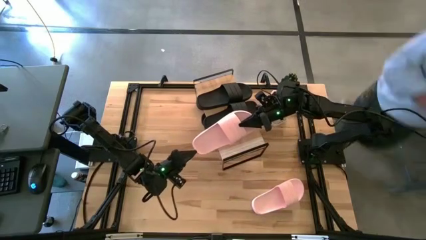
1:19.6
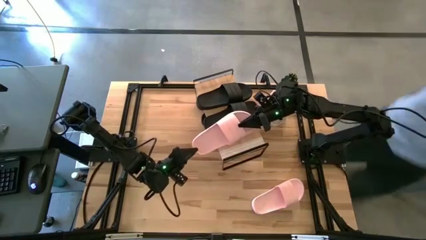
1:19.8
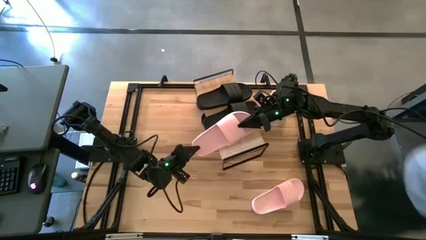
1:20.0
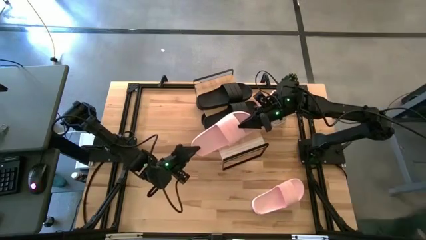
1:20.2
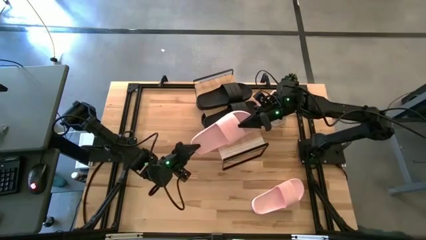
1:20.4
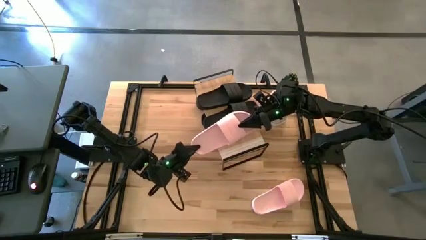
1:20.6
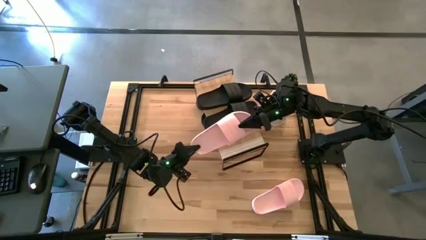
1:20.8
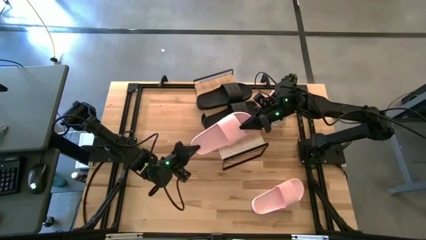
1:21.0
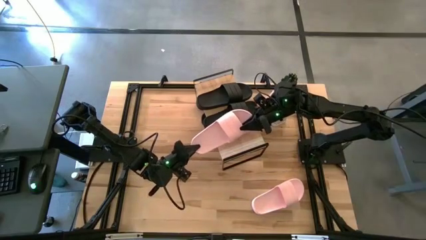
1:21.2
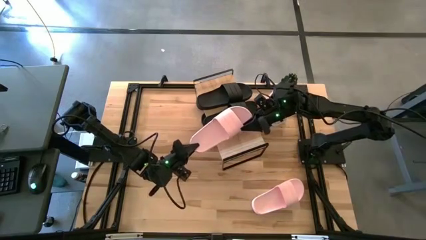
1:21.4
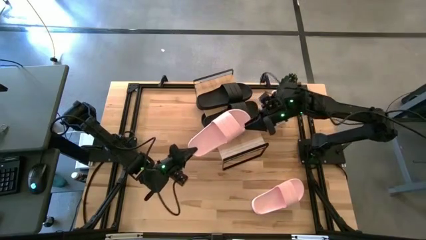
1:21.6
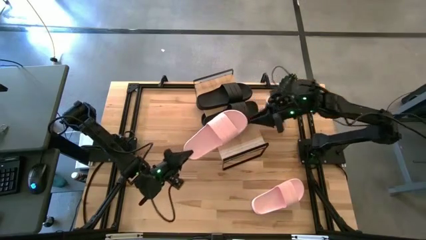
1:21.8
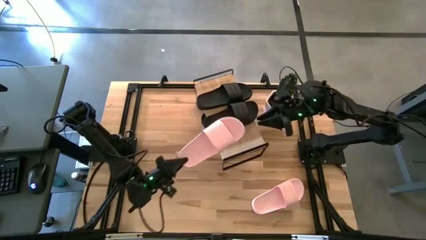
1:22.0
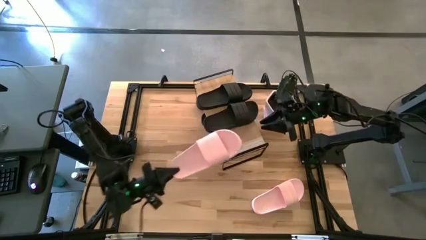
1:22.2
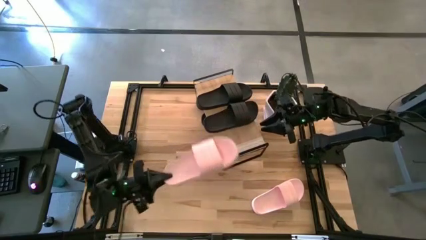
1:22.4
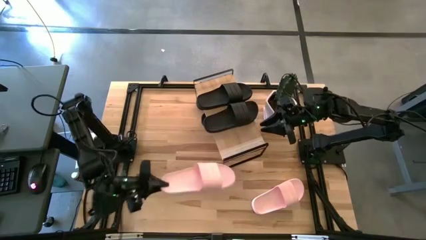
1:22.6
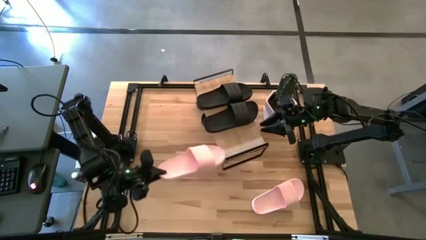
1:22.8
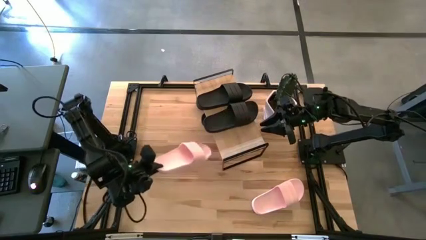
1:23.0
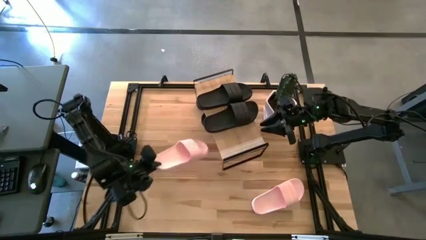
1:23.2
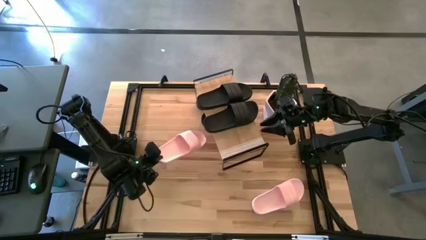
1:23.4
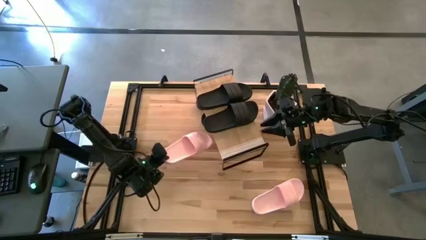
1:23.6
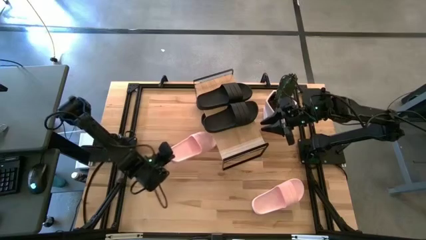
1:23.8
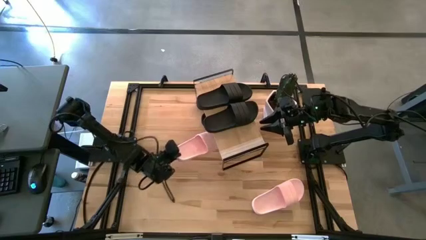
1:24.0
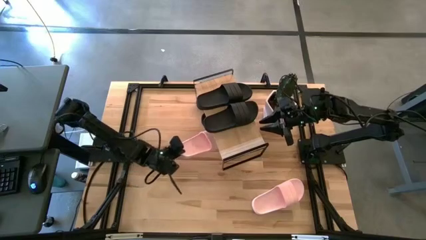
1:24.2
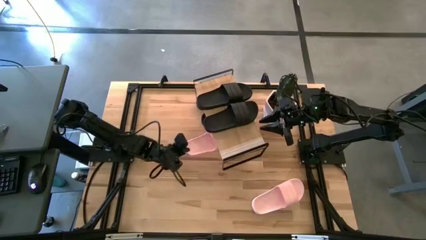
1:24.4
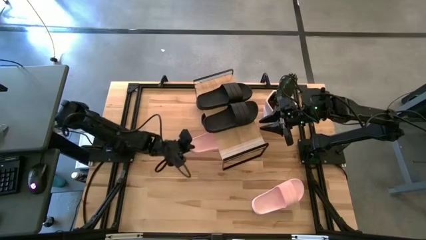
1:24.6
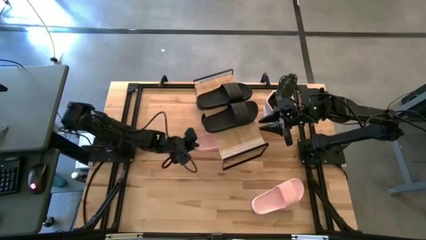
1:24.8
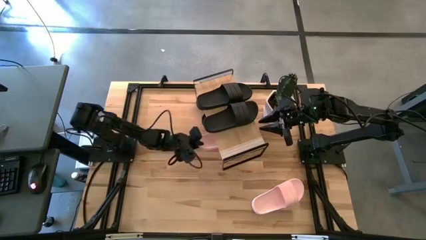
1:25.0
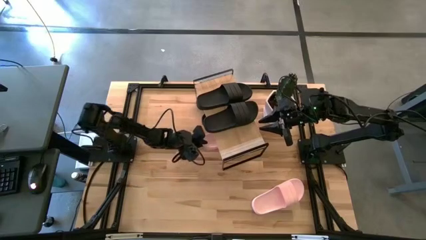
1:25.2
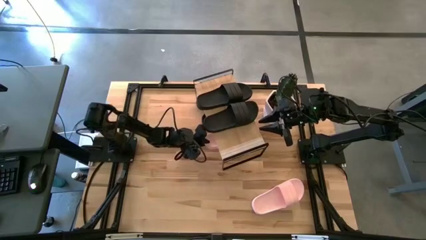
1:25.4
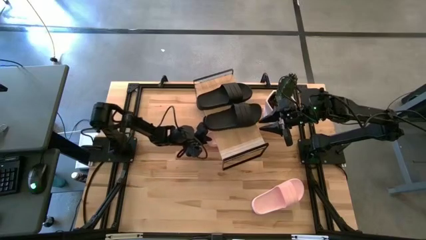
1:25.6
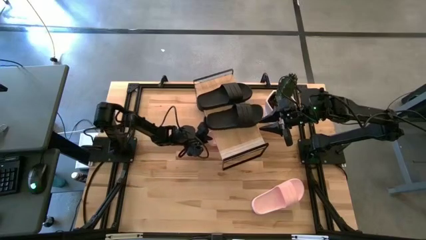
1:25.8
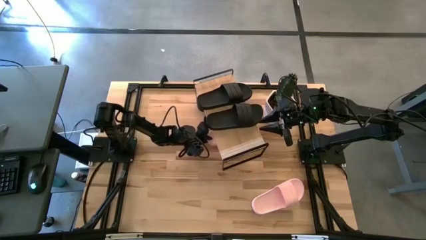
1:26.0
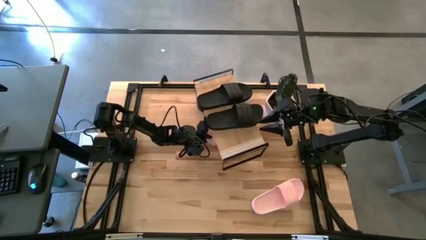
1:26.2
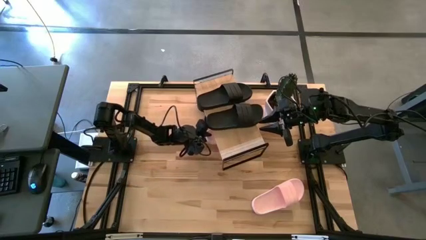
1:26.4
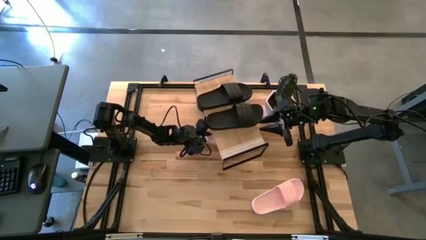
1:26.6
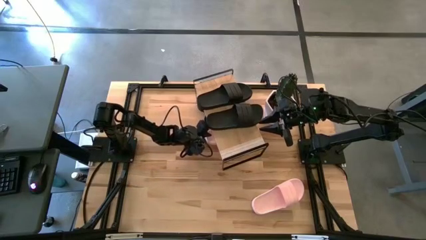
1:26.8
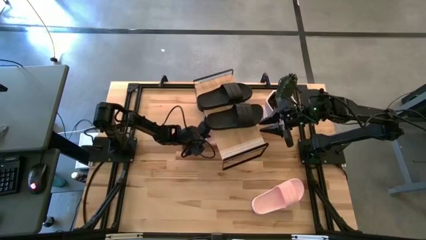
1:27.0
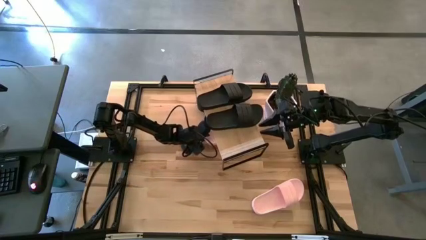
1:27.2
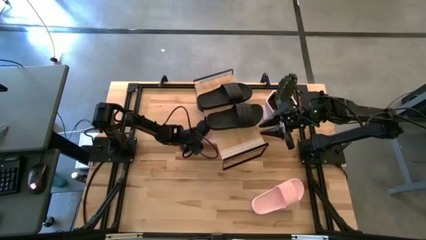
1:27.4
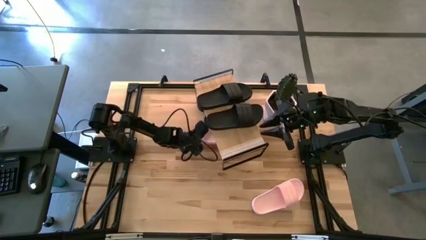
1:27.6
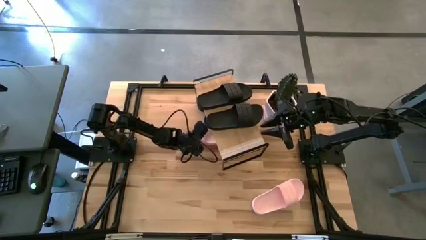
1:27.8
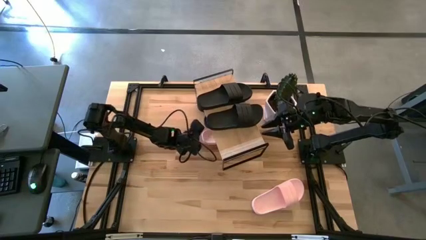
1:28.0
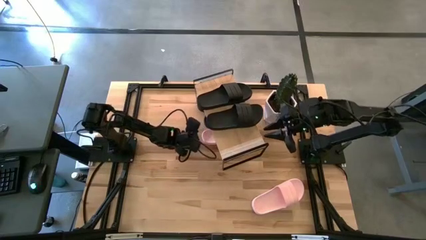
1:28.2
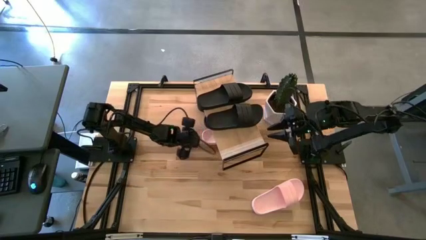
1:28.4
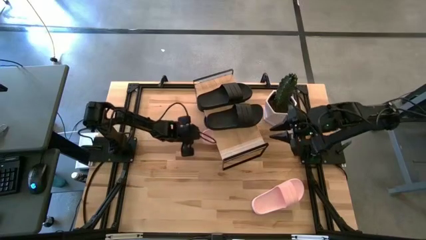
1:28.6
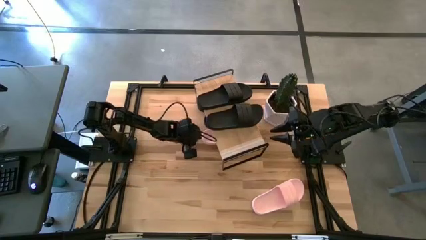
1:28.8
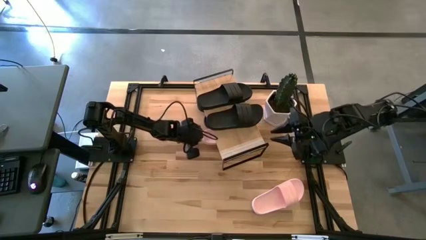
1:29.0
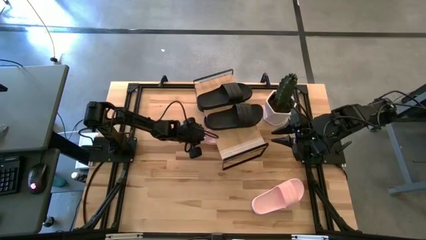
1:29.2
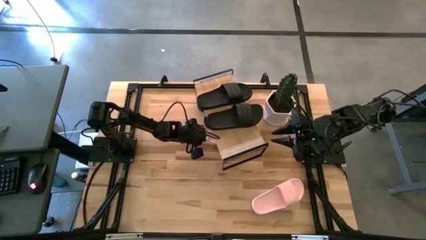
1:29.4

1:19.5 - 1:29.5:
Task: Pick and place slides into the shelf
Put the pink slide under the shelf

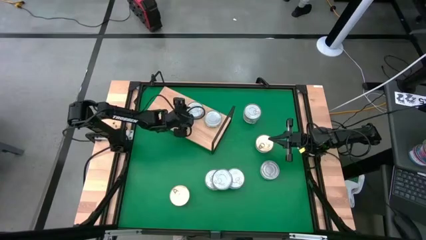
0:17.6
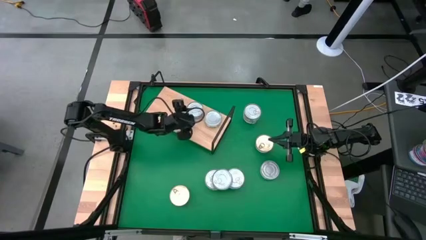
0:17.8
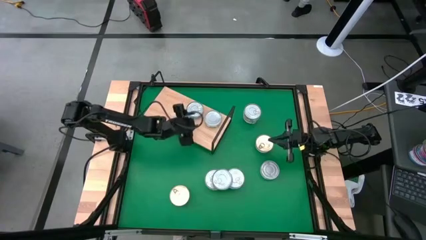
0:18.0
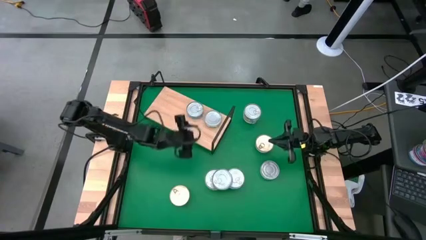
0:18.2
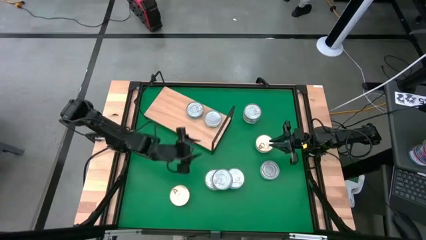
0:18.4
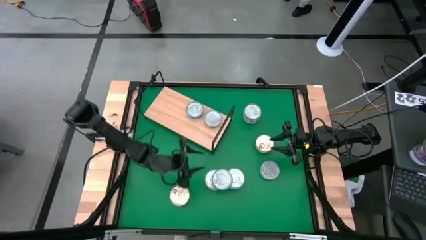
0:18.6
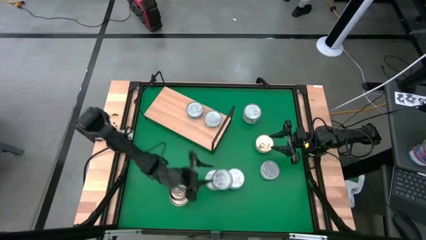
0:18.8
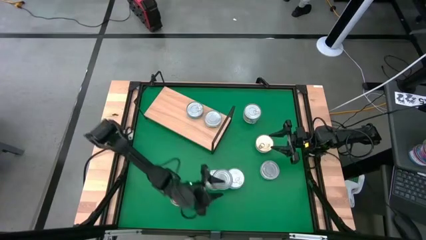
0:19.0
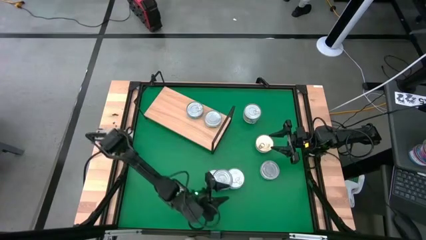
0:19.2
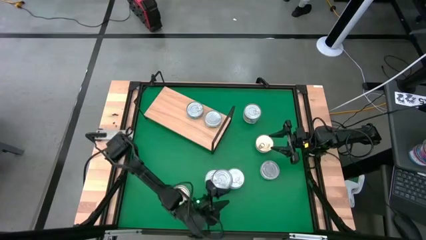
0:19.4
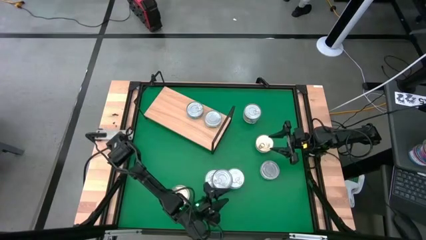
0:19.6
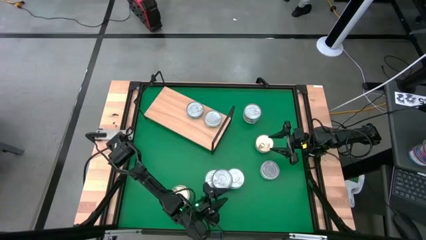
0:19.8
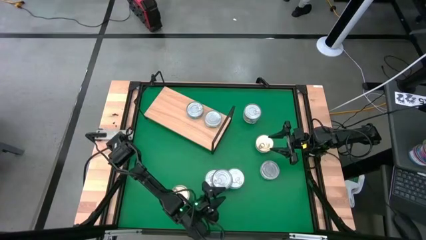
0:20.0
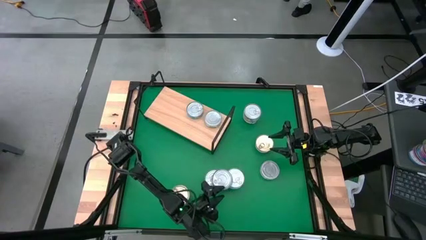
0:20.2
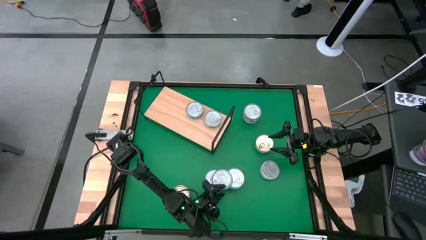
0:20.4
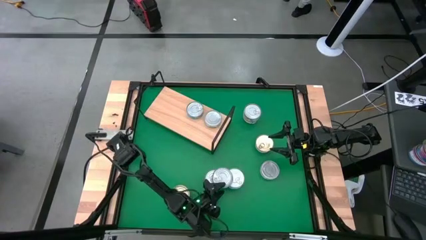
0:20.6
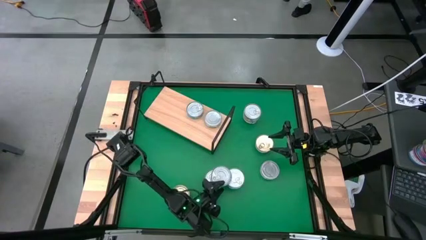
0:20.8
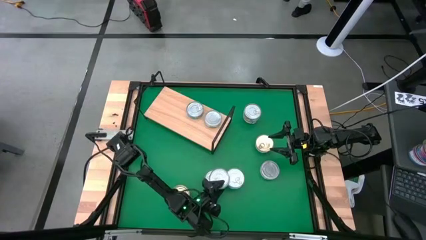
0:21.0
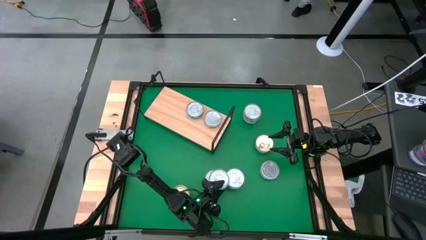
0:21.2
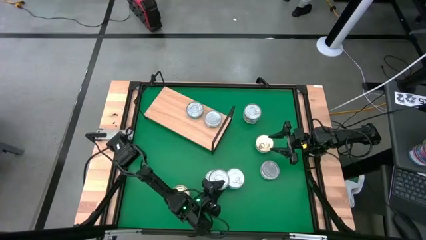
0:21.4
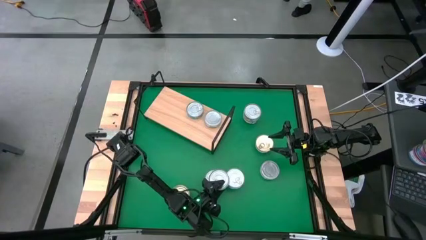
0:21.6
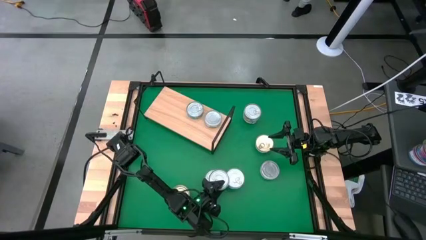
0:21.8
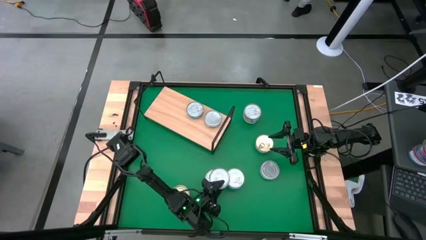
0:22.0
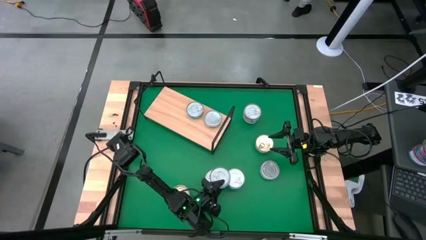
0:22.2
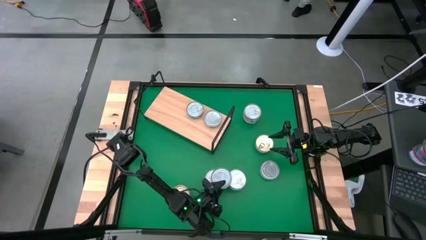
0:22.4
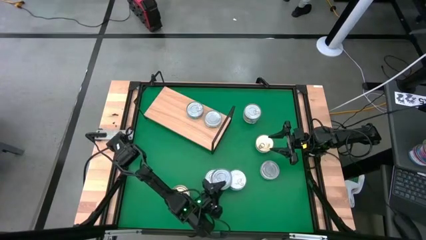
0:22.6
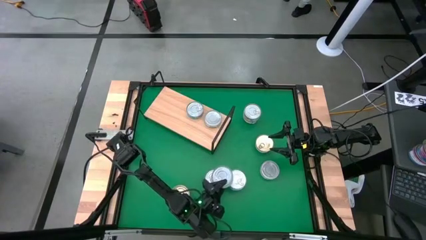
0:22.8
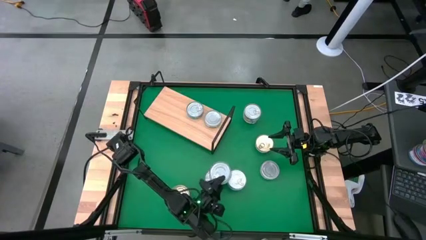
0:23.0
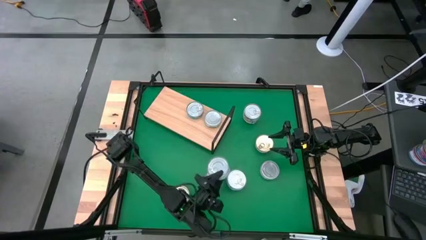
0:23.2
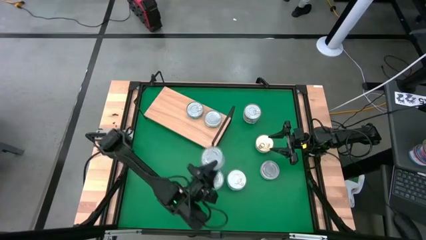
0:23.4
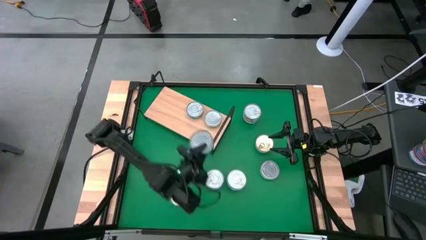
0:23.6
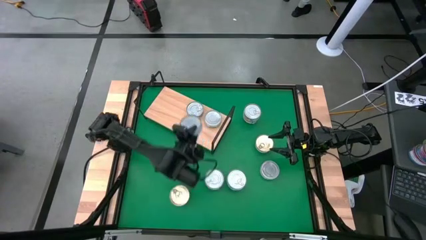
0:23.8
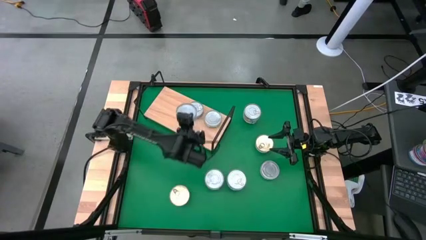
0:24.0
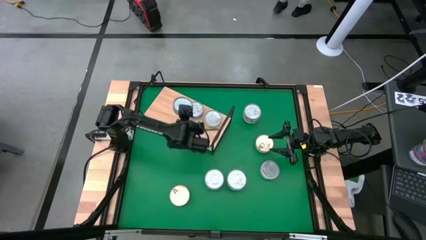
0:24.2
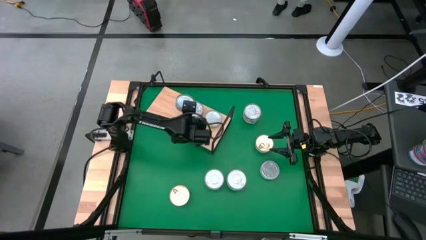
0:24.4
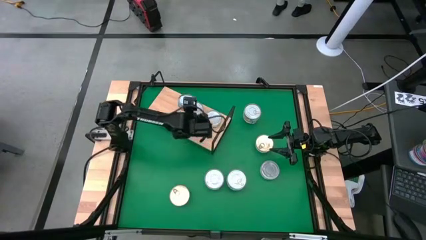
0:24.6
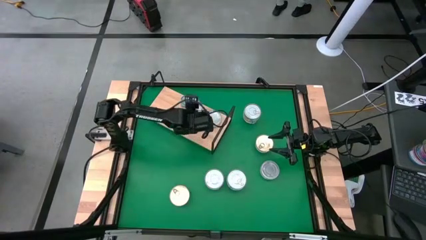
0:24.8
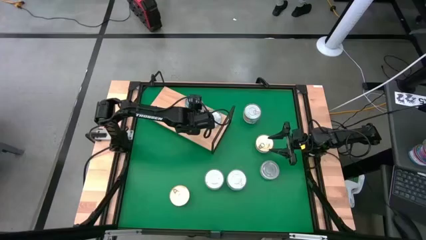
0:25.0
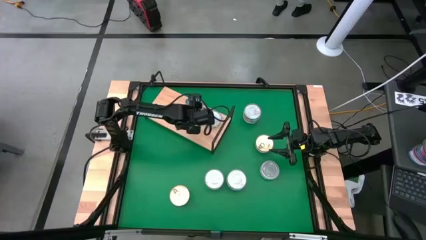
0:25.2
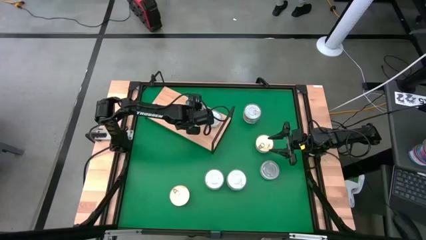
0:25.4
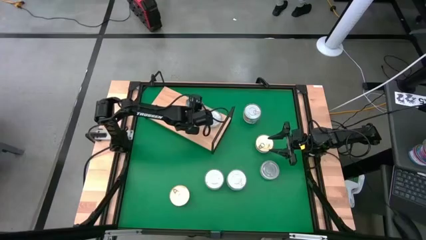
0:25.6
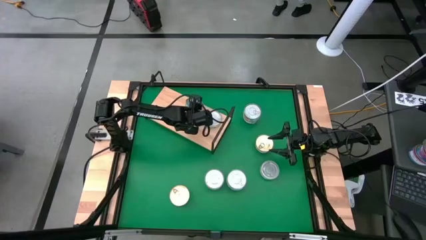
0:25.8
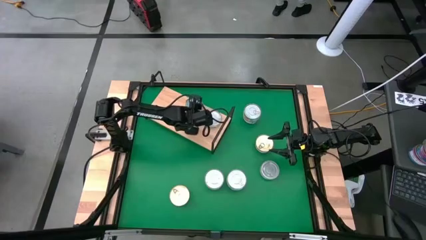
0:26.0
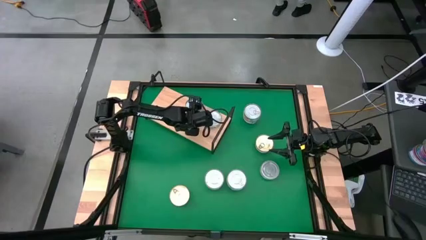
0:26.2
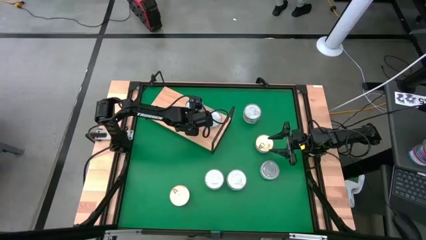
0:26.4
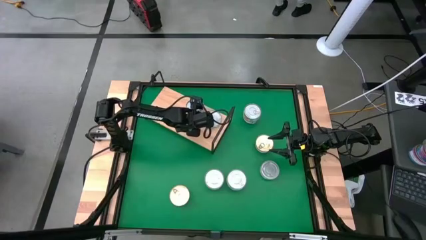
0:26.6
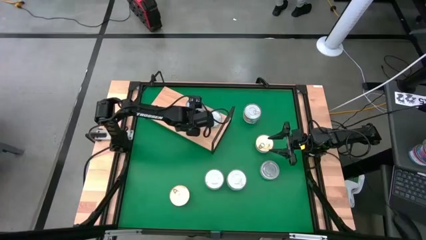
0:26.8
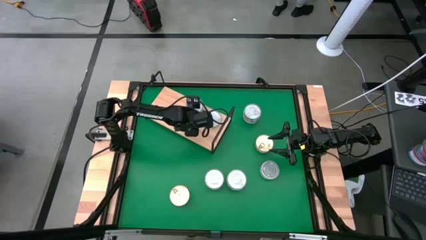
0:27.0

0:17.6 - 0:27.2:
Task: Stack canned seafood by type on shelf
Stack the sky blue tuna can on top of the sky blue tuna can
